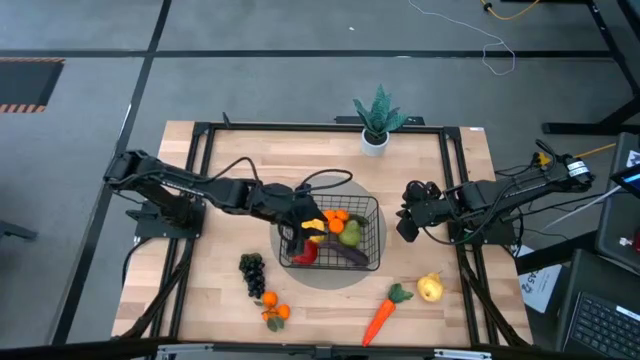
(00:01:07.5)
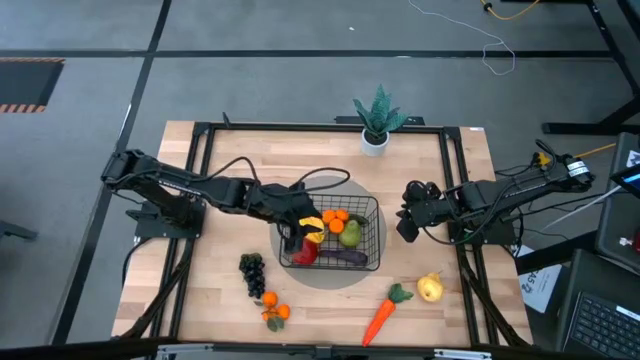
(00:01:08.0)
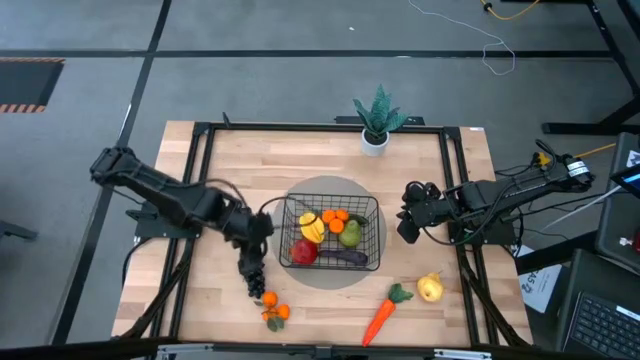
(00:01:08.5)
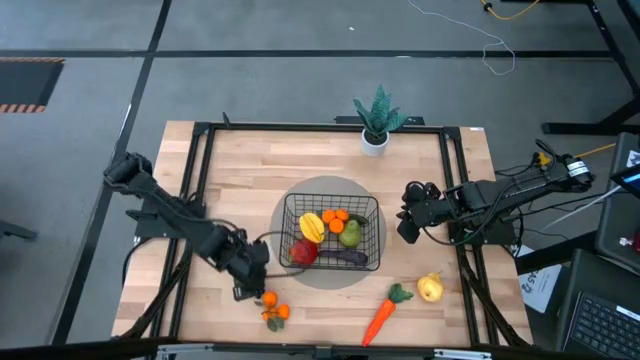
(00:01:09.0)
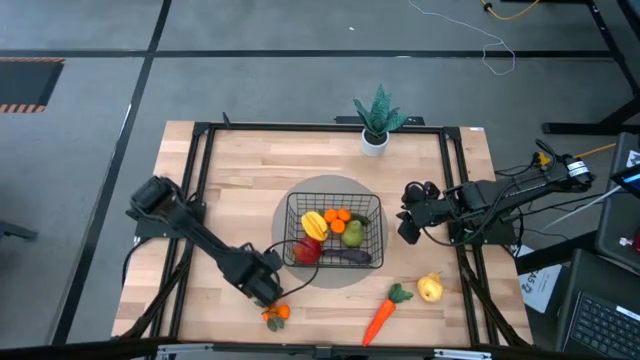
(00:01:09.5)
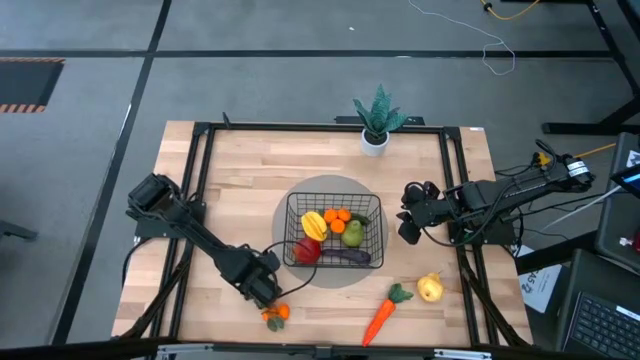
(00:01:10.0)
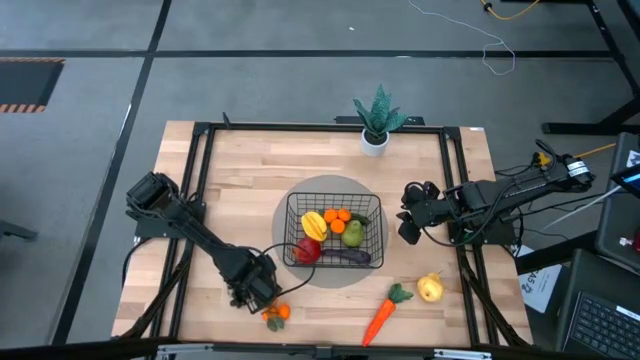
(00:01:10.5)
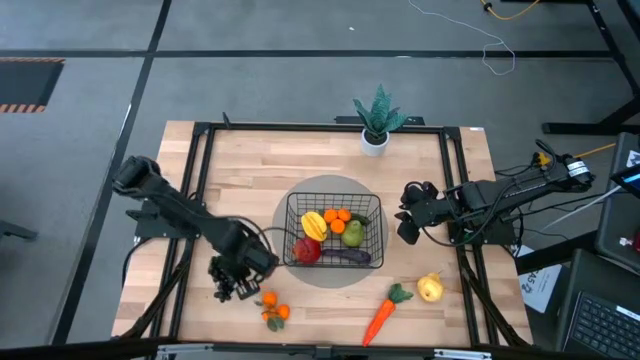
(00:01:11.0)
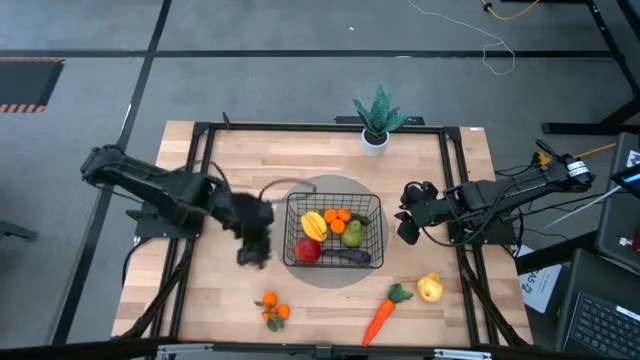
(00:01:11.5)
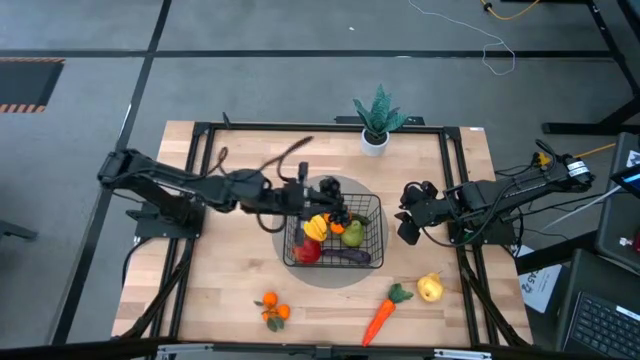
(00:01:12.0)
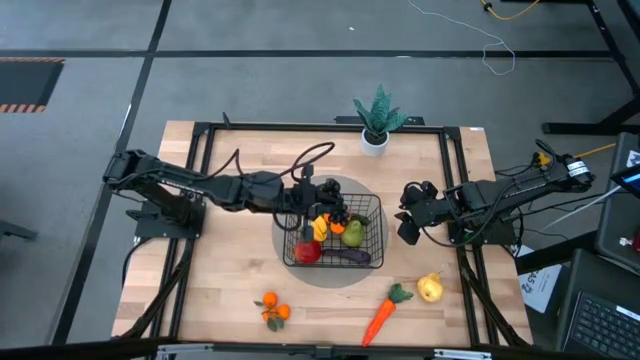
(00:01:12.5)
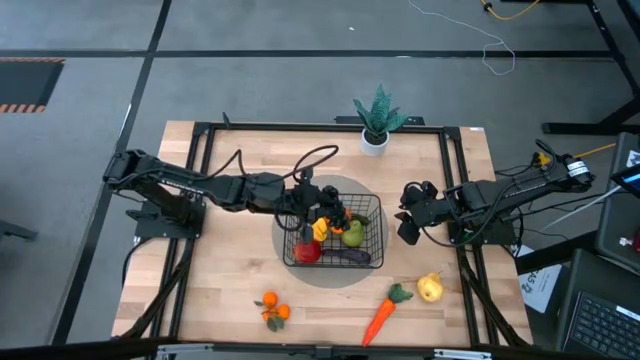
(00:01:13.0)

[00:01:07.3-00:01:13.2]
Task: Build produce basket
Put the grapes into the black wire basket

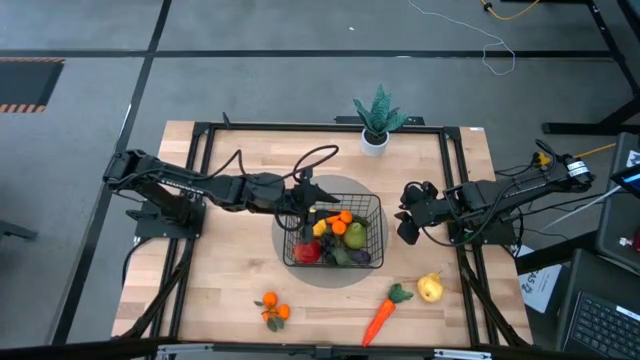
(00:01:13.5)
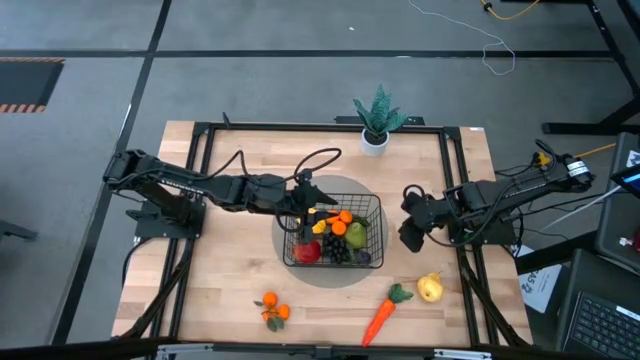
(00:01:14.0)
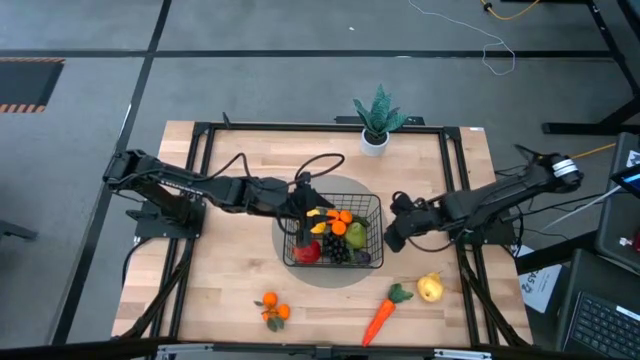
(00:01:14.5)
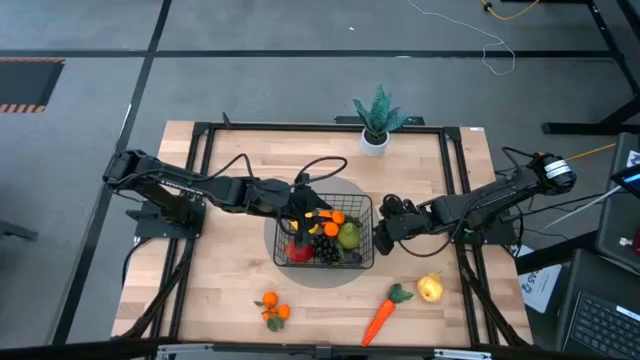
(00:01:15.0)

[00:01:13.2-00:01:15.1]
Adjust the black wire basket

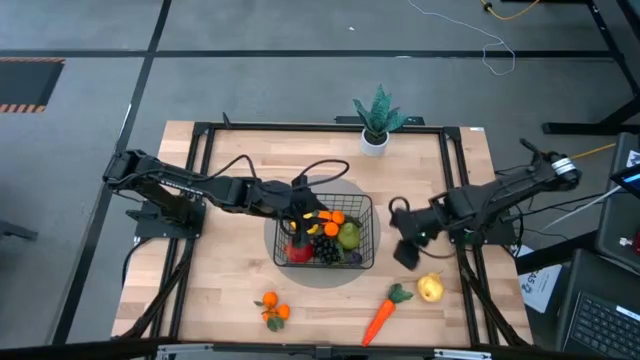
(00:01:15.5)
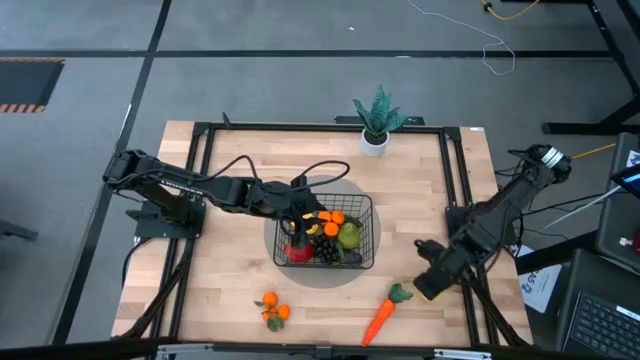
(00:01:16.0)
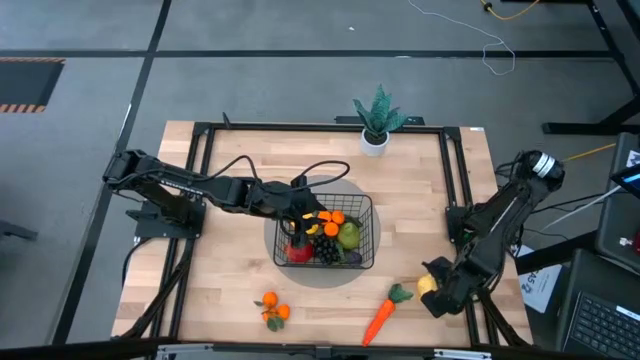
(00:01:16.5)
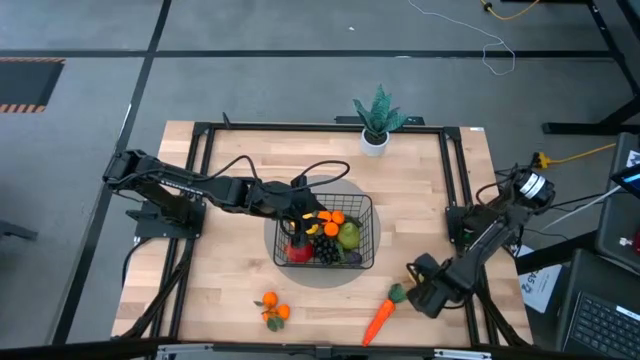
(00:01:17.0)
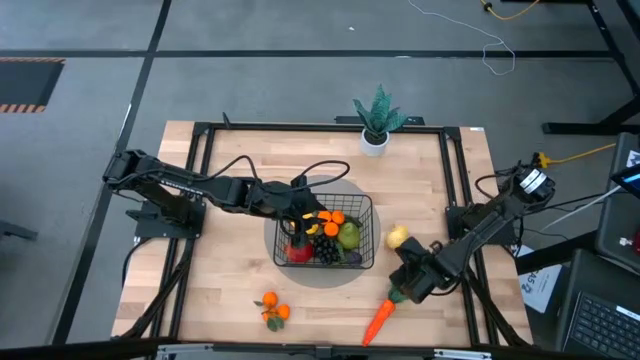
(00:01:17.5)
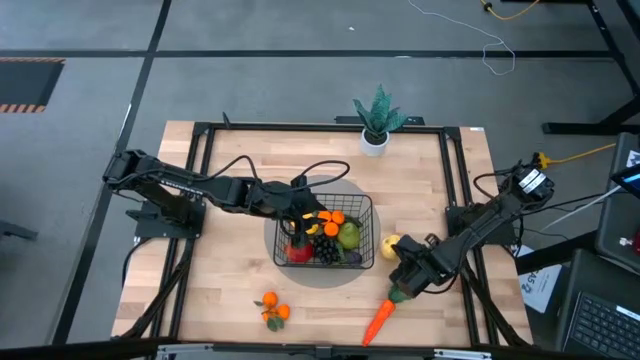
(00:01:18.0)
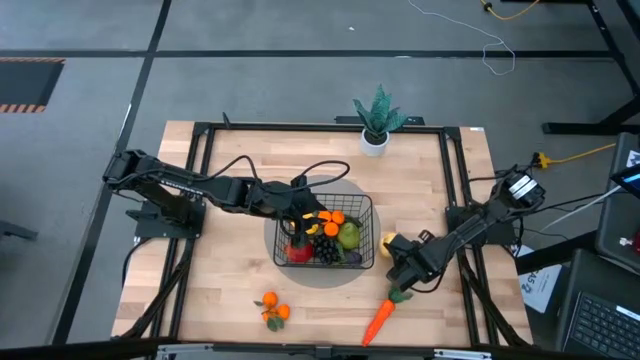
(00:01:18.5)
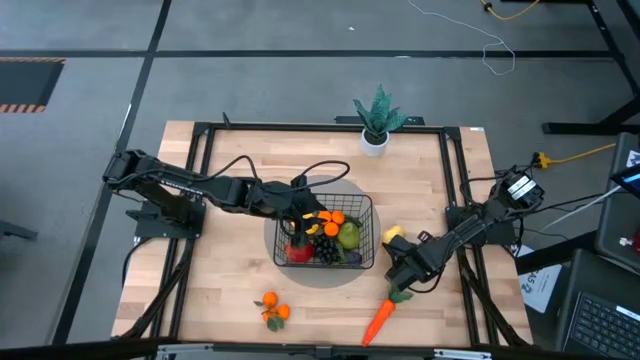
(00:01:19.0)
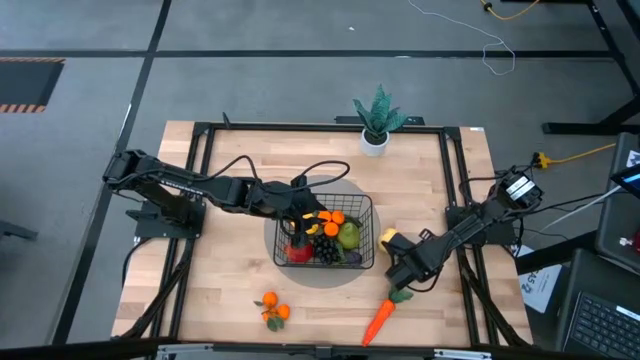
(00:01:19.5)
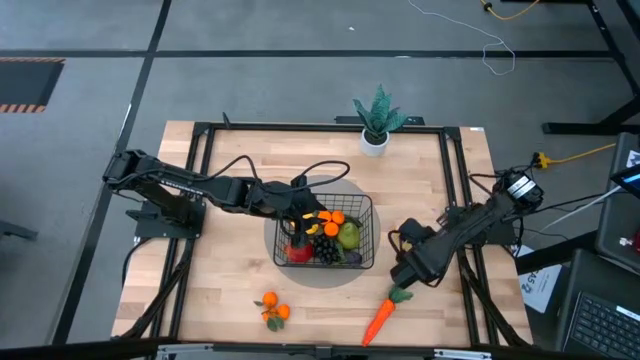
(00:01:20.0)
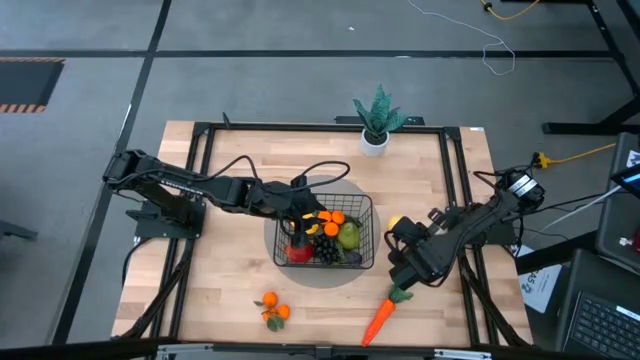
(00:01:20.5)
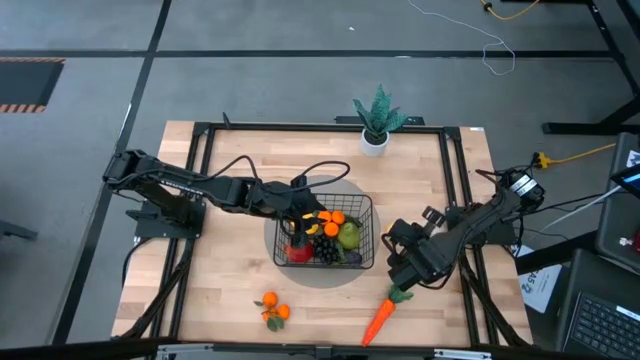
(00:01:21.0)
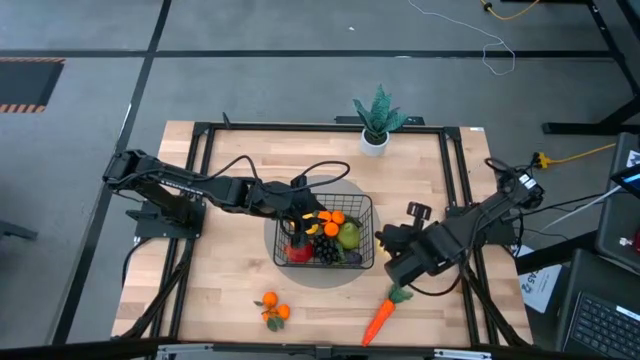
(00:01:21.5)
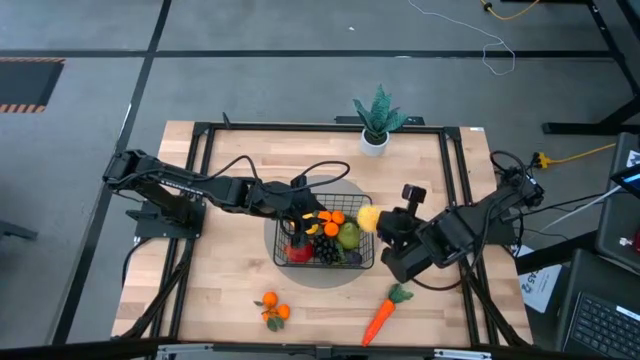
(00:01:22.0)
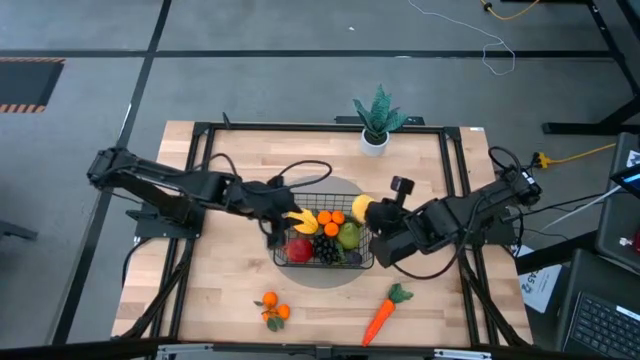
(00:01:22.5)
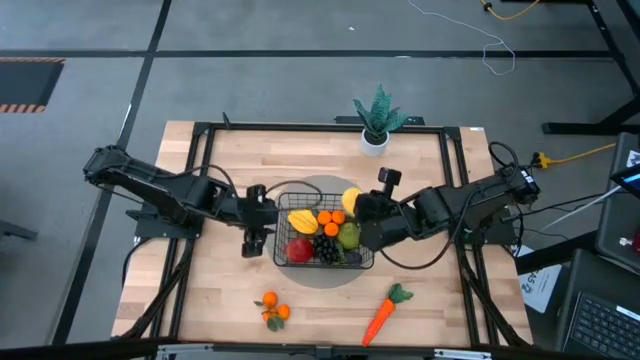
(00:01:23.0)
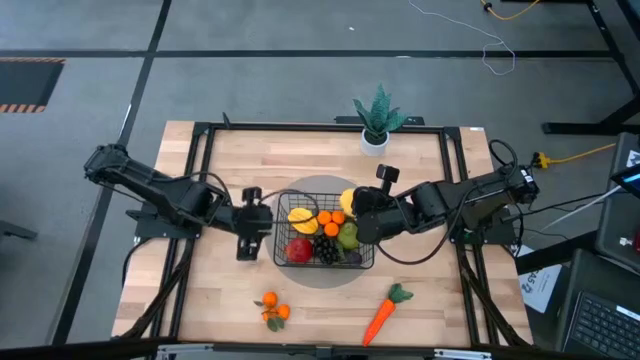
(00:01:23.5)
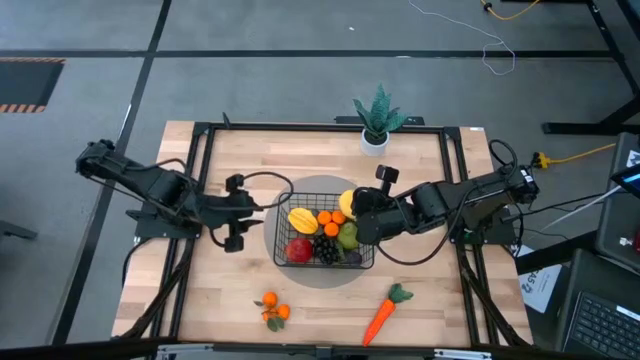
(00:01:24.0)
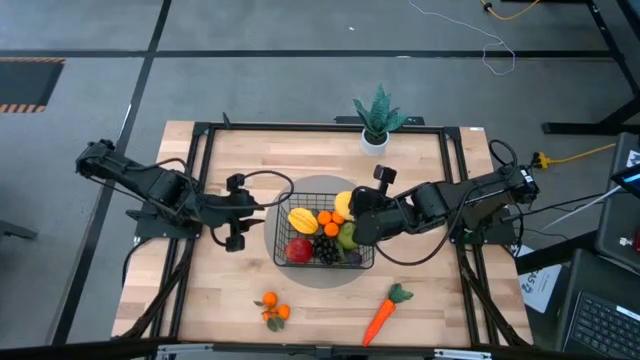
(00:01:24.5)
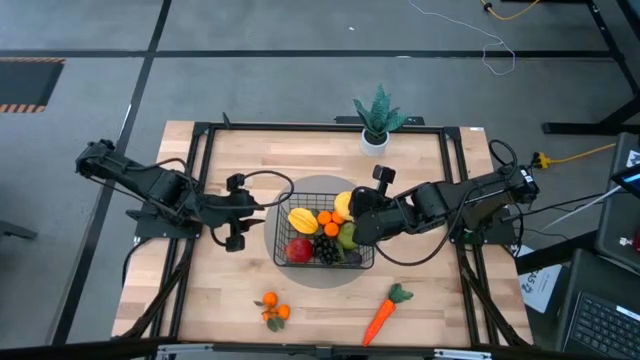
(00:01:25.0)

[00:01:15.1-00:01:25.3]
Put the yellow pear into the black wire basket

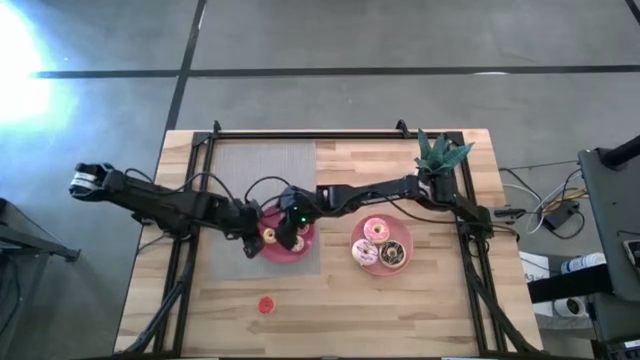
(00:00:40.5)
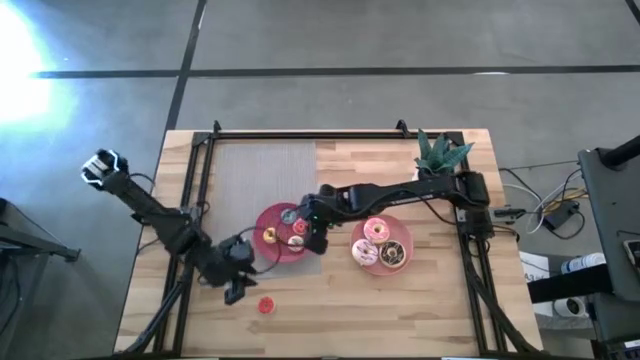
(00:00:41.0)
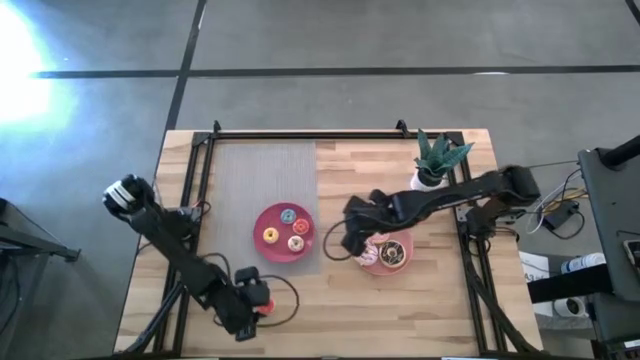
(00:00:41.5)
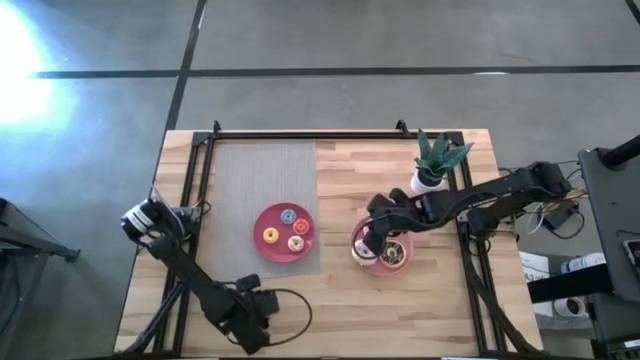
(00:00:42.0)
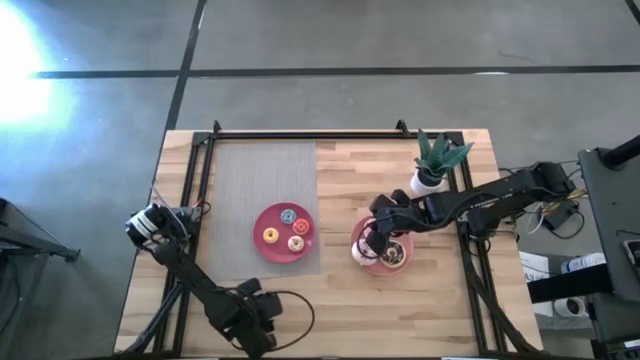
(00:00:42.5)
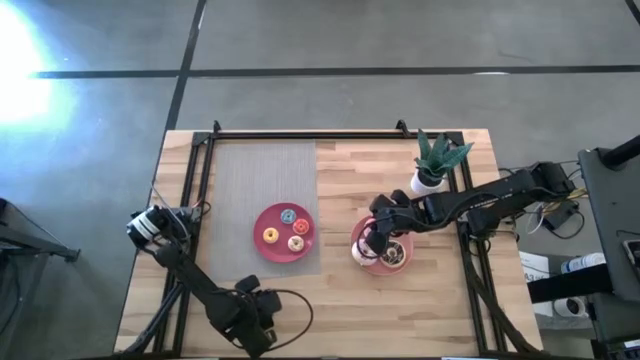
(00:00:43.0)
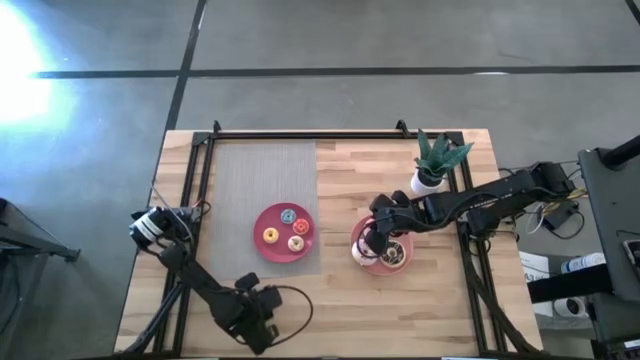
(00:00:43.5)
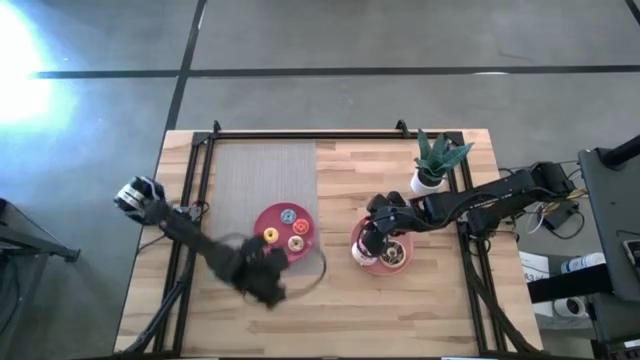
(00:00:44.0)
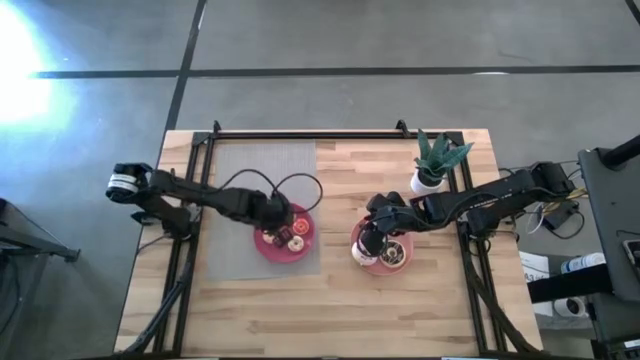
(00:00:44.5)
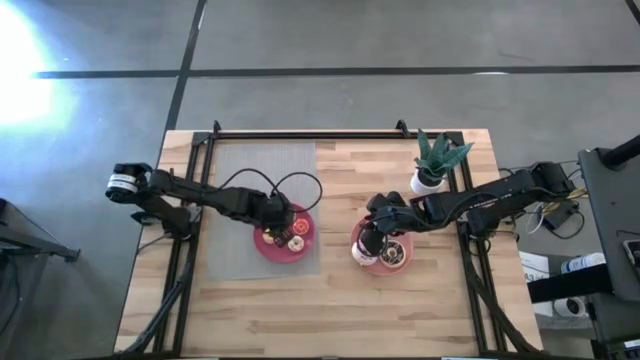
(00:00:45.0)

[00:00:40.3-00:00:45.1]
Task: Pick & Place donuts
Put the small red donut on the dark pink plate
